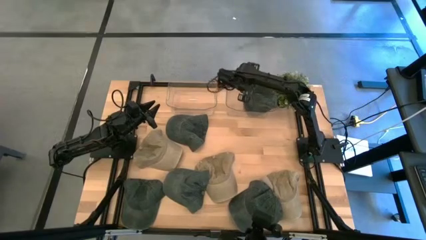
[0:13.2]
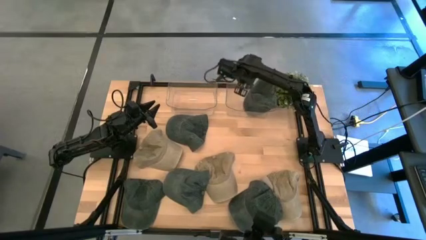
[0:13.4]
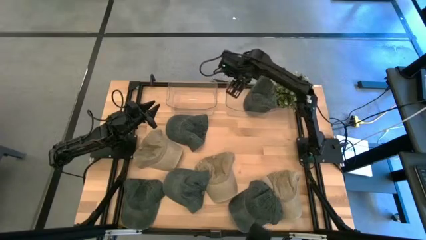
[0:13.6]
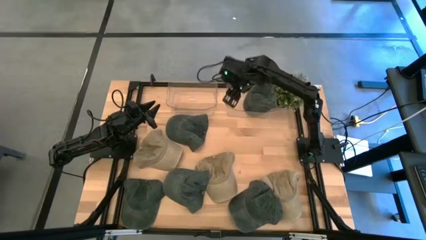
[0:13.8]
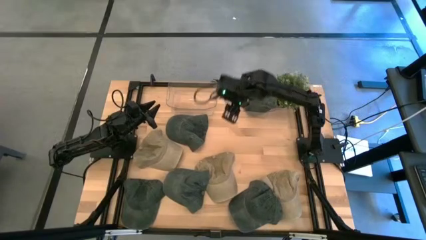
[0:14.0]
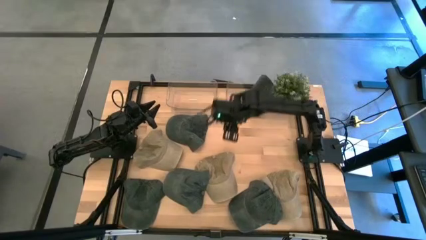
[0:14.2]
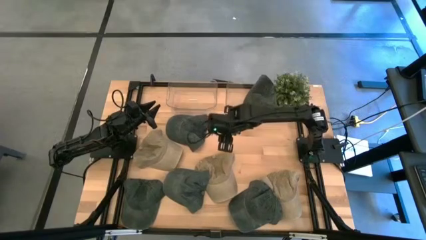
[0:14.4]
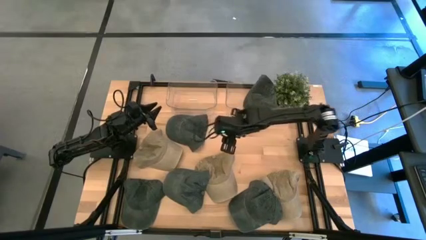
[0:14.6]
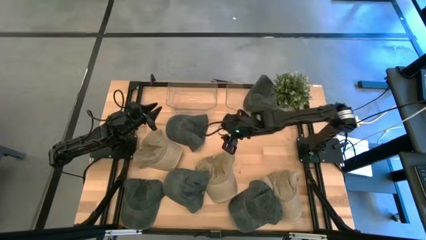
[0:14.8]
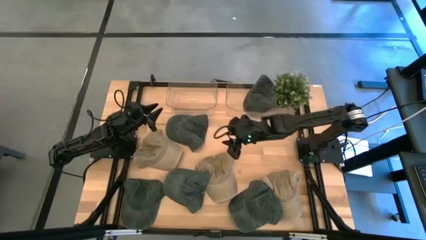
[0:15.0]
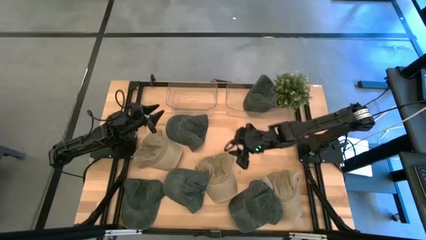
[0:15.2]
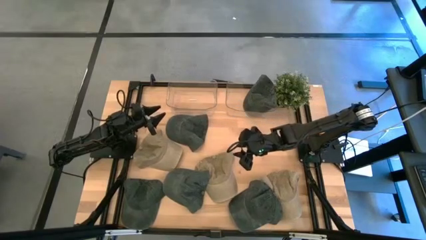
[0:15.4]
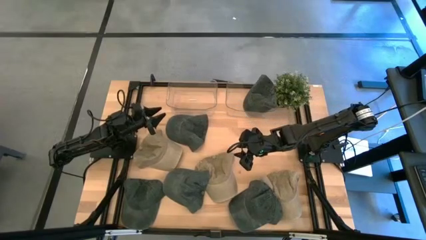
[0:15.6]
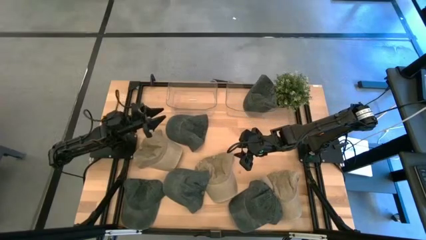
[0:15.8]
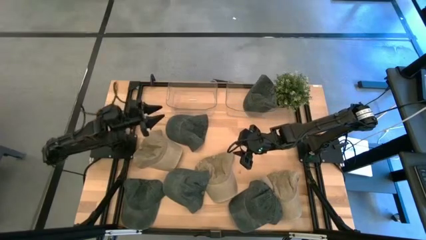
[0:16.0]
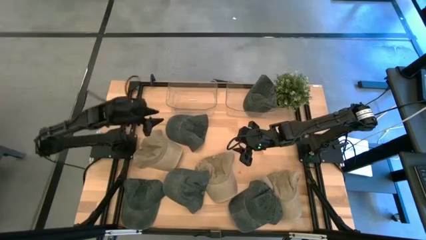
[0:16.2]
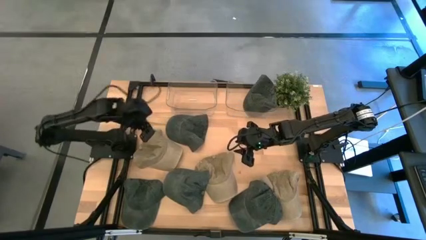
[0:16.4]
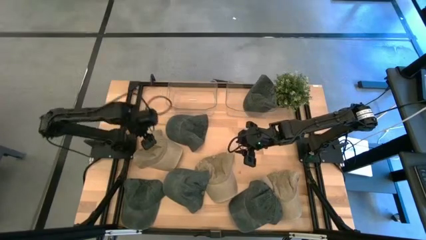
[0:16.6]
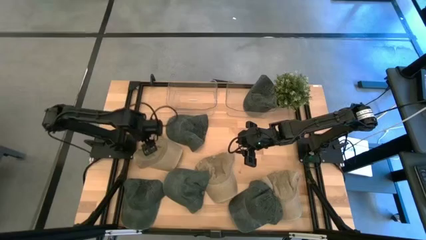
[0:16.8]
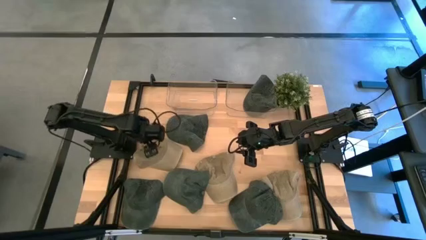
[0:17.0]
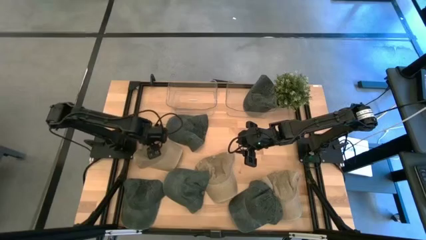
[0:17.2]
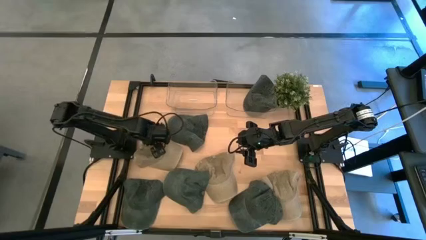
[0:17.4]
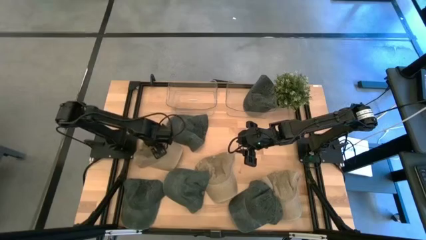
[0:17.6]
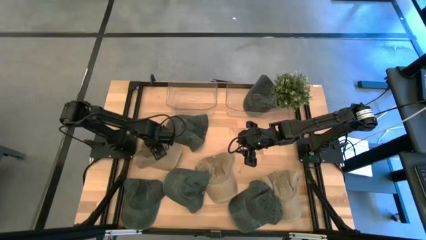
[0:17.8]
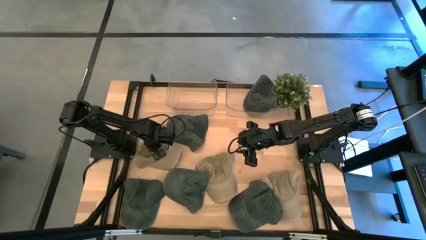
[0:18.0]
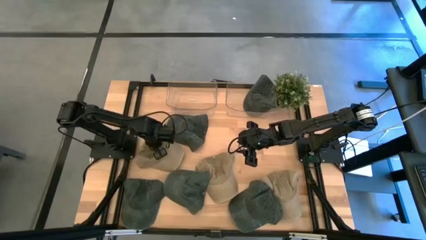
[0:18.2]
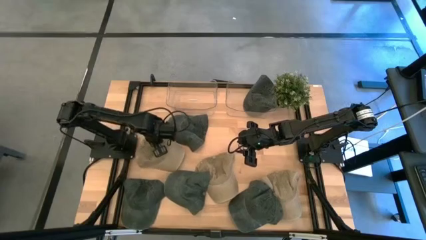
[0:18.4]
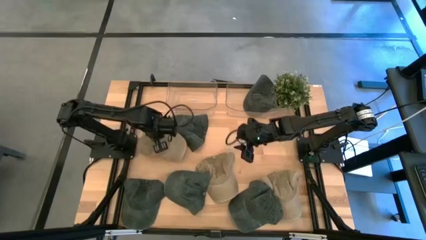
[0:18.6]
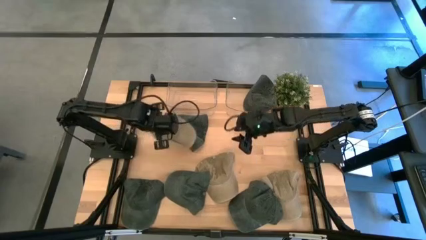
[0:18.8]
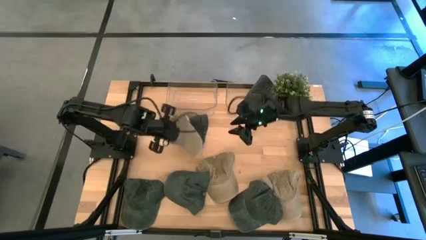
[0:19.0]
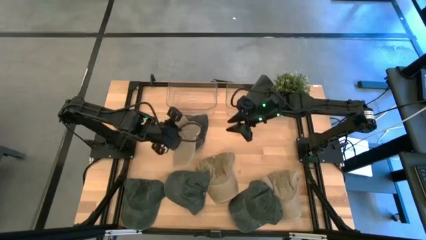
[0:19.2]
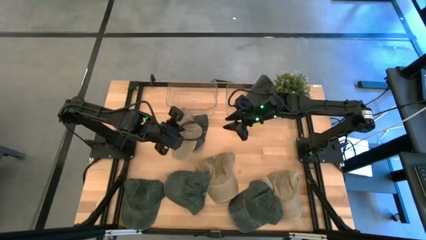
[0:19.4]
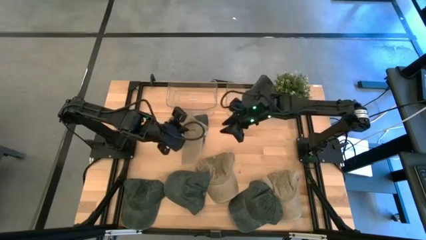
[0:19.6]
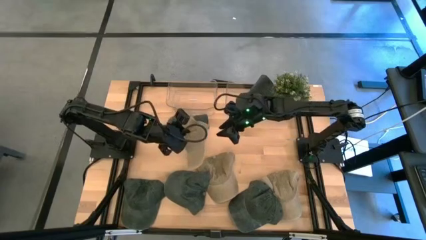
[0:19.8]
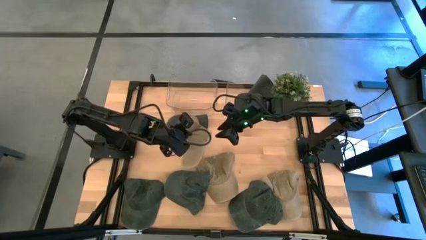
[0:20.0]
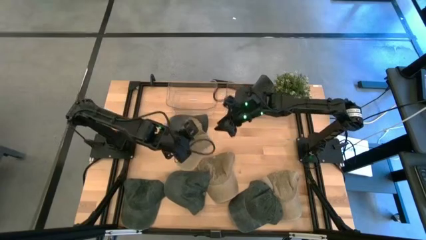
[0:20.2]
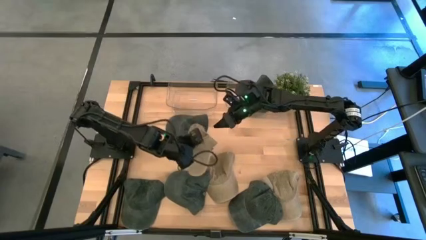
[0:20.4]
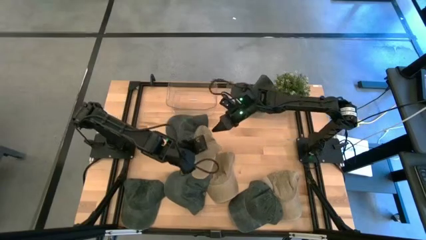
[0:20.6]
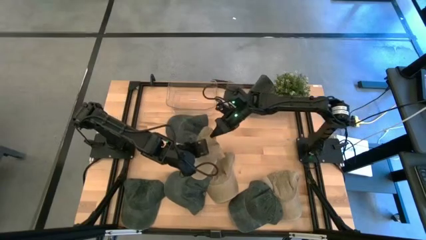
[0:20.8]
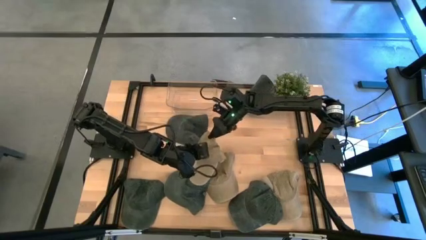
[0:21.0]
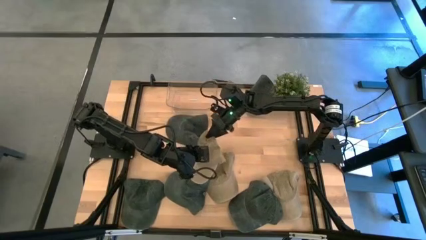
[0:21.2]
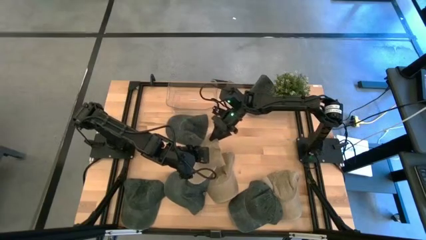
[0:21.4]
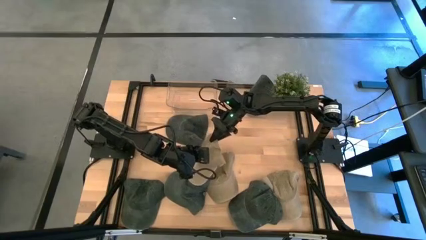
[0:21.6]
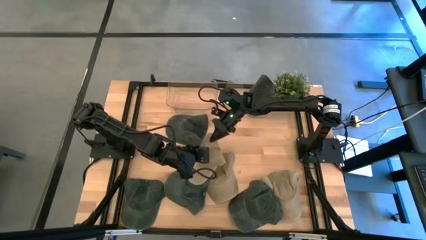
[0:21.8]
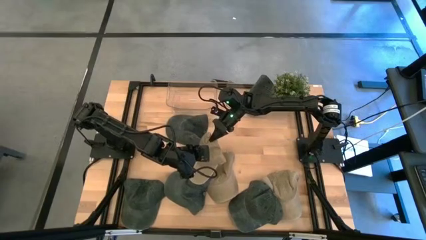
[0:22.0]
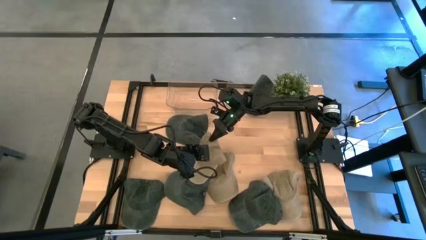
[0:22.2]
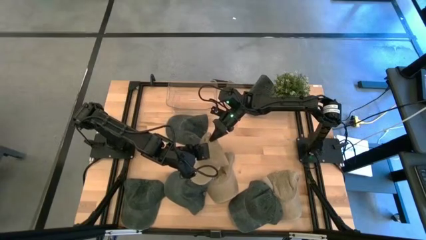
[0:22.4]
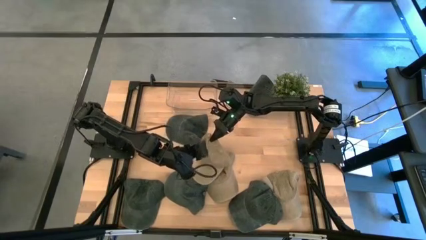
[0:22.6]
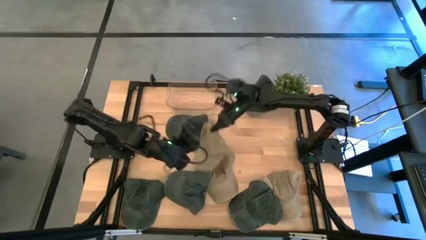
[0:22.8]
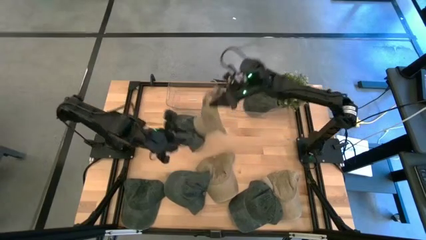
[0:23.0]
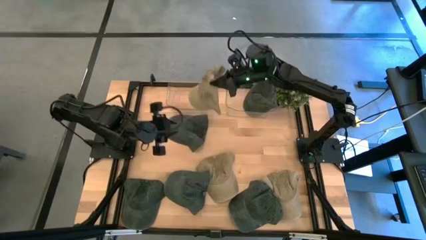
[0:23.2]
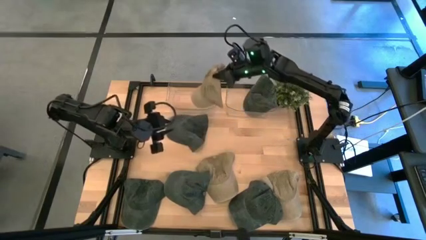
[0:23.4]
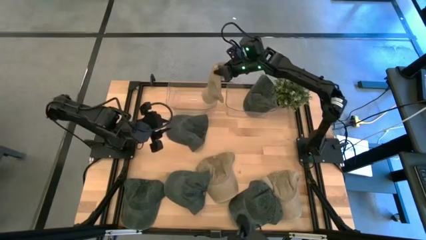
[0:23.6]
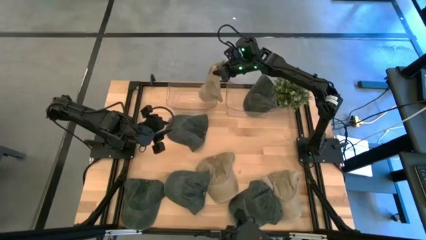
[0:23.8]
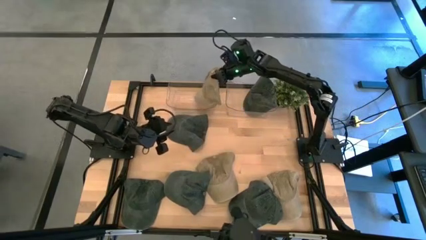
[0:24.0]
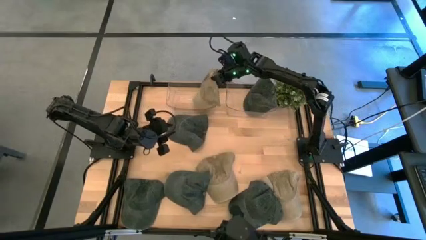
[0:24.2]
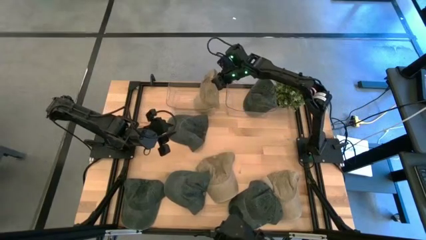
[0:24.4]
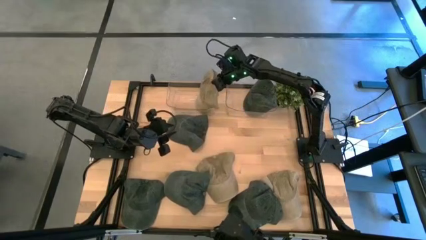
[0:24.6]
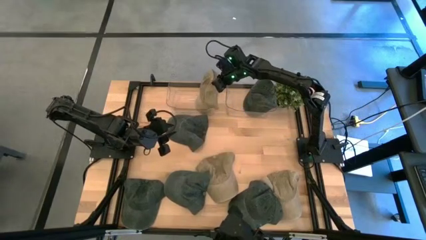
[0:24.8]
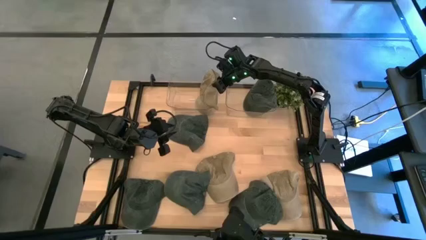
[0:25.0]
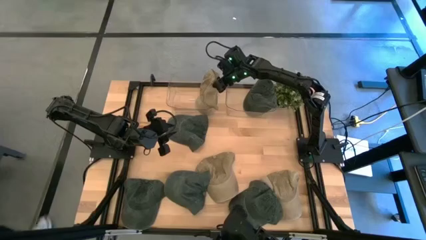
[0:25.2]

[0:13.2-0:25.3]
Task: Pick & Place hat
Put the brown cap into the left transparent bin
